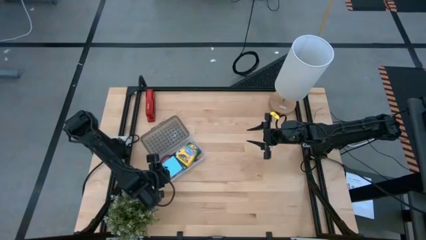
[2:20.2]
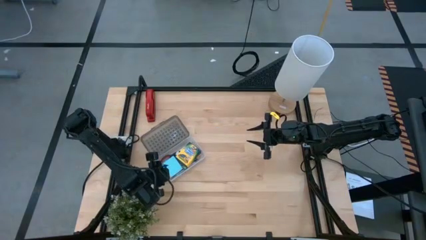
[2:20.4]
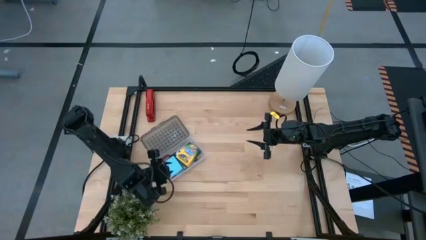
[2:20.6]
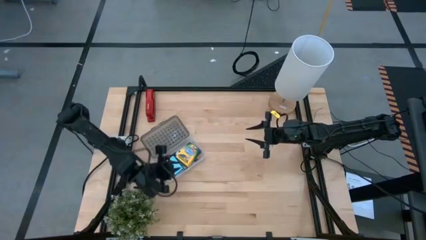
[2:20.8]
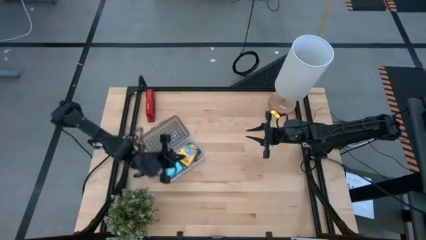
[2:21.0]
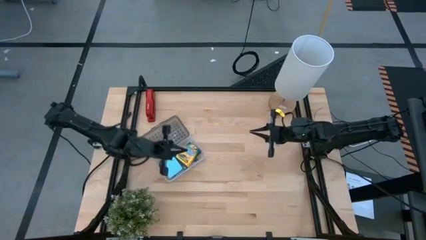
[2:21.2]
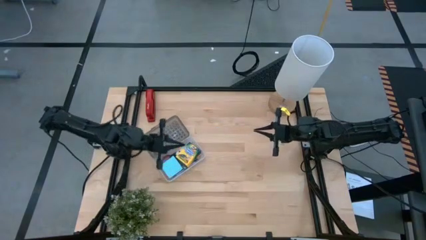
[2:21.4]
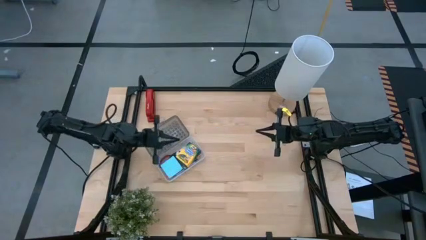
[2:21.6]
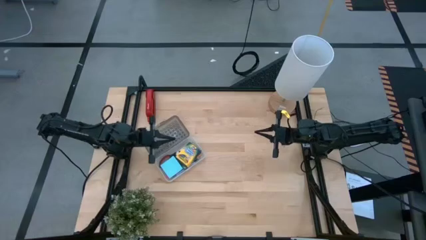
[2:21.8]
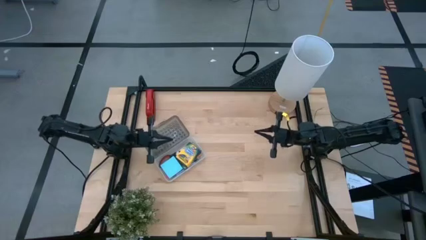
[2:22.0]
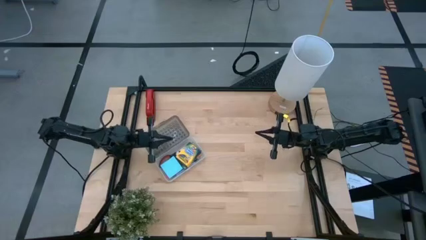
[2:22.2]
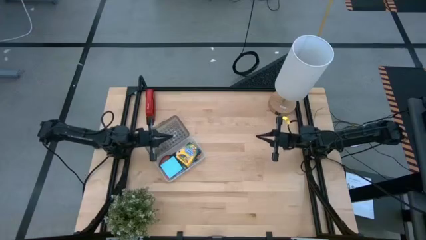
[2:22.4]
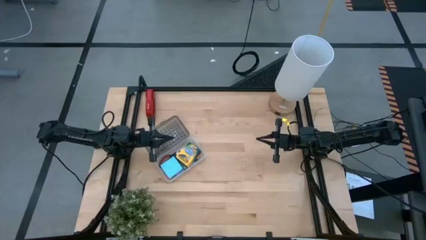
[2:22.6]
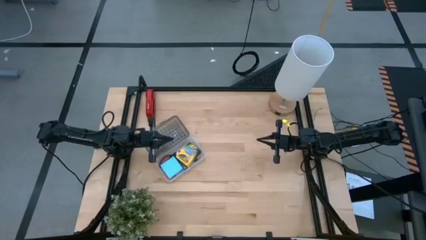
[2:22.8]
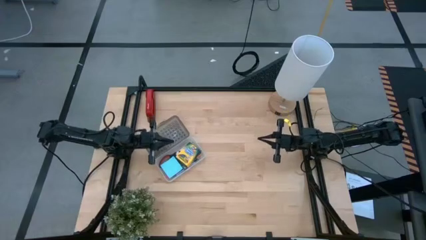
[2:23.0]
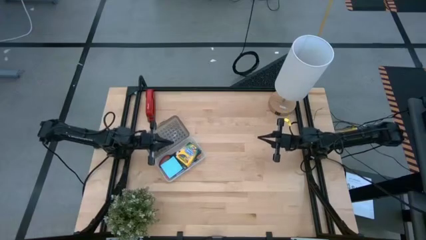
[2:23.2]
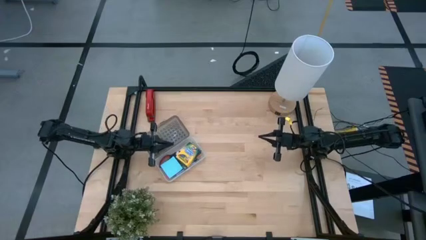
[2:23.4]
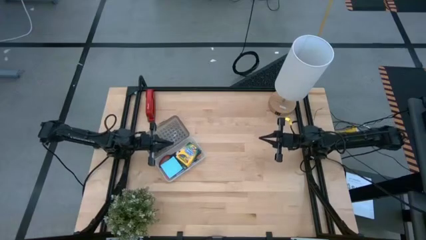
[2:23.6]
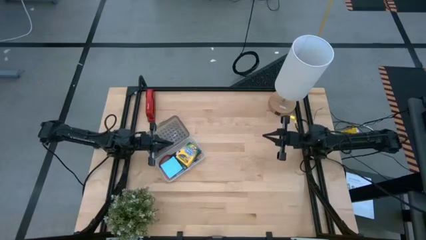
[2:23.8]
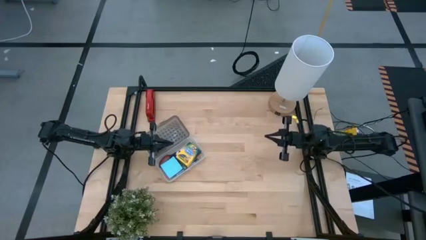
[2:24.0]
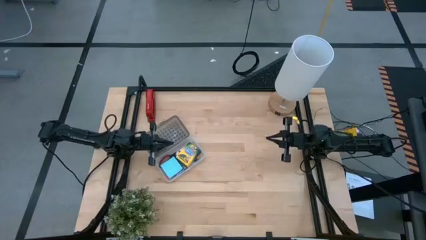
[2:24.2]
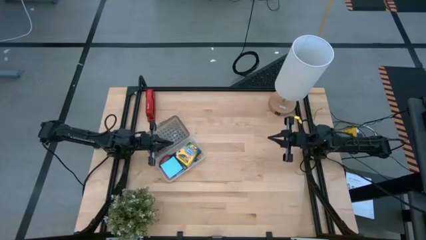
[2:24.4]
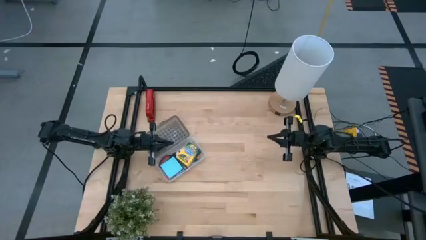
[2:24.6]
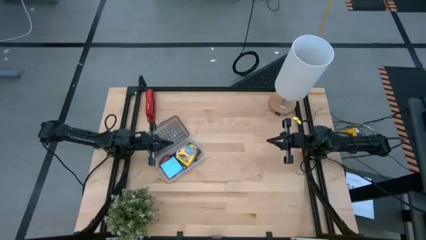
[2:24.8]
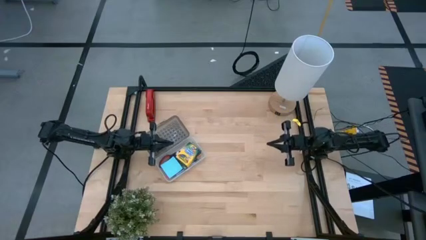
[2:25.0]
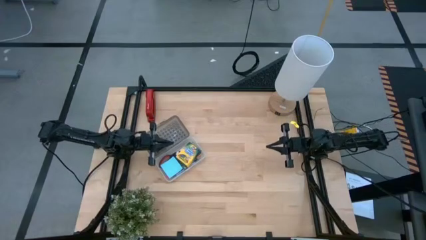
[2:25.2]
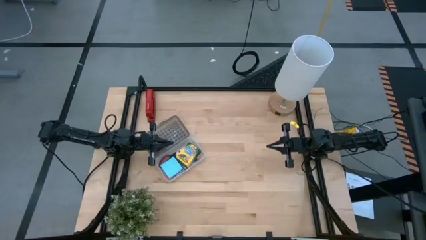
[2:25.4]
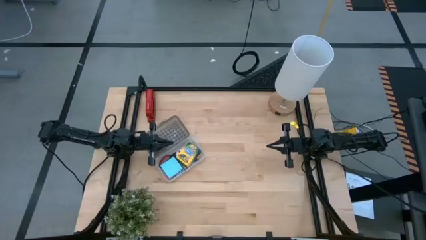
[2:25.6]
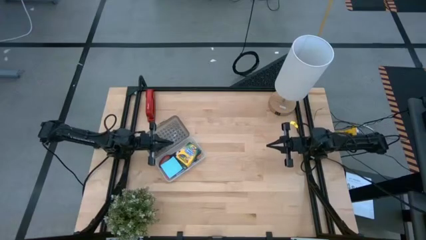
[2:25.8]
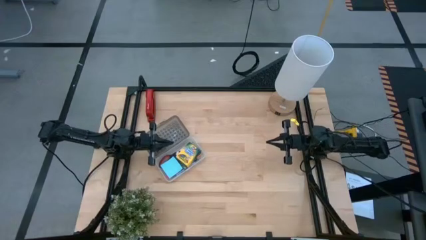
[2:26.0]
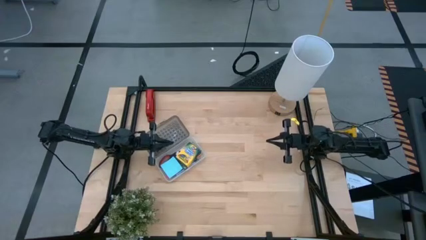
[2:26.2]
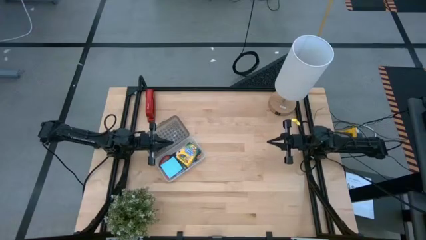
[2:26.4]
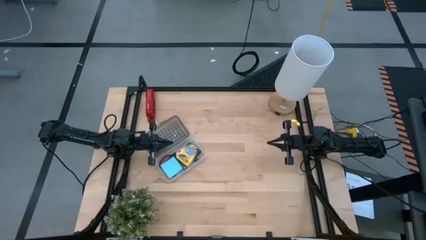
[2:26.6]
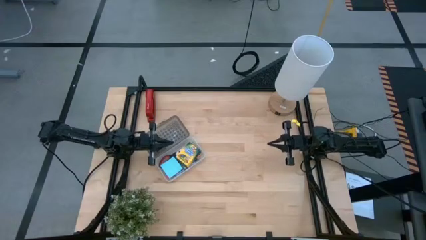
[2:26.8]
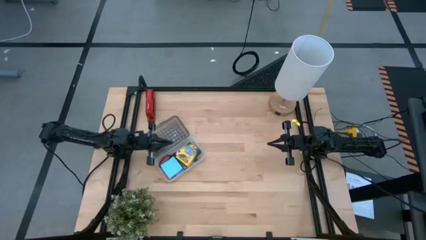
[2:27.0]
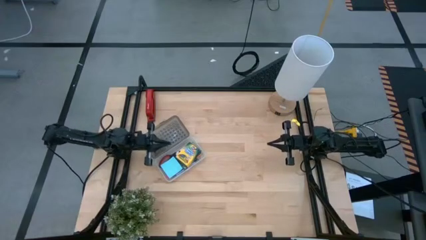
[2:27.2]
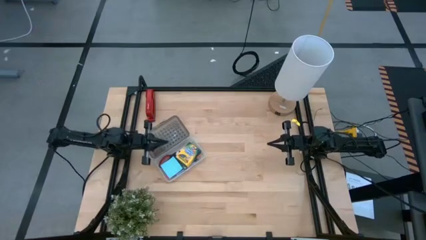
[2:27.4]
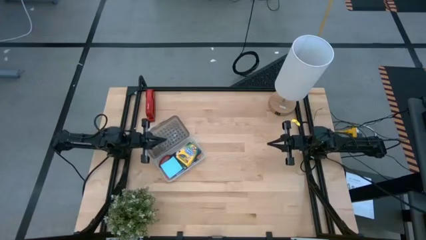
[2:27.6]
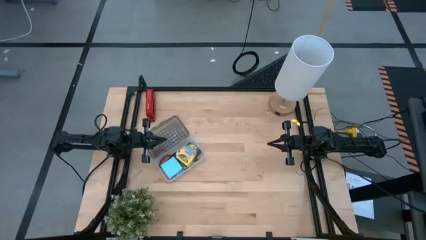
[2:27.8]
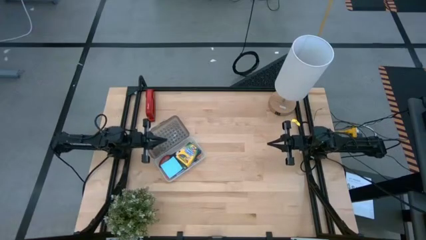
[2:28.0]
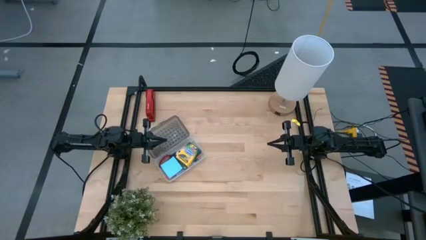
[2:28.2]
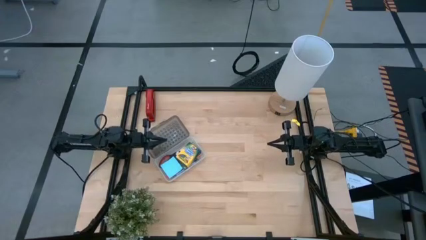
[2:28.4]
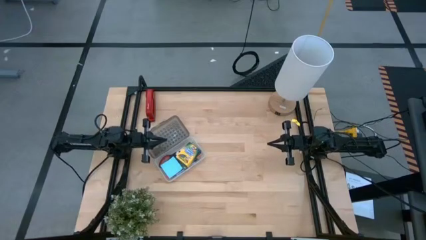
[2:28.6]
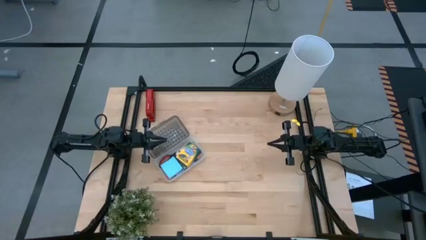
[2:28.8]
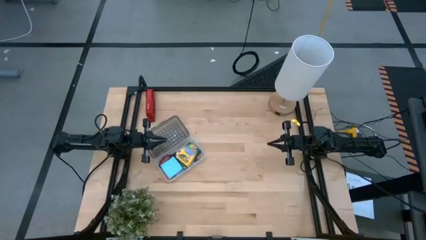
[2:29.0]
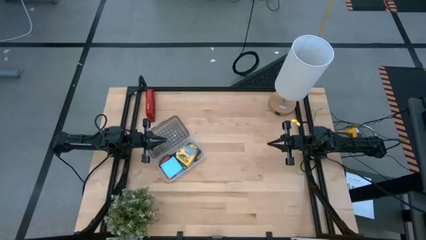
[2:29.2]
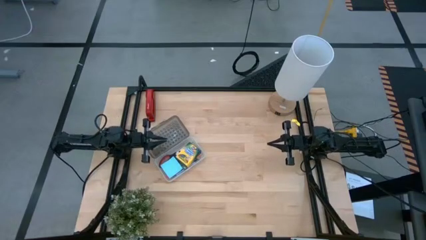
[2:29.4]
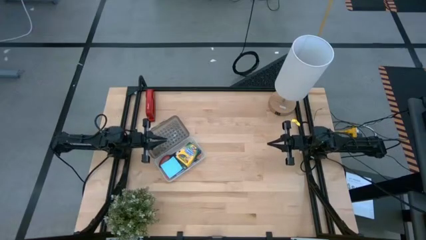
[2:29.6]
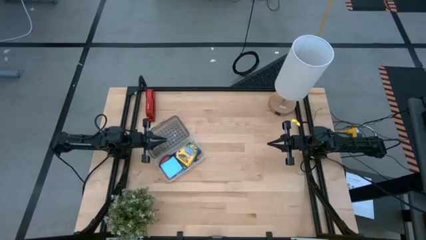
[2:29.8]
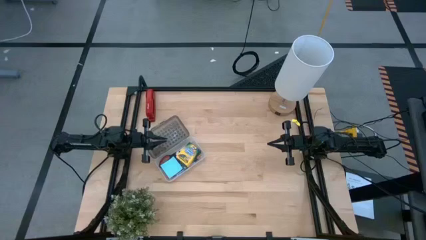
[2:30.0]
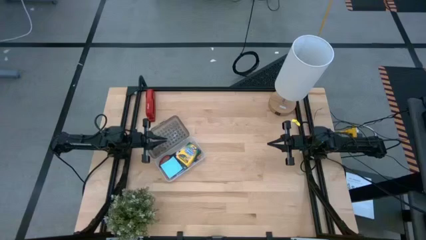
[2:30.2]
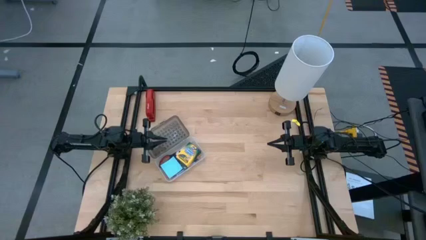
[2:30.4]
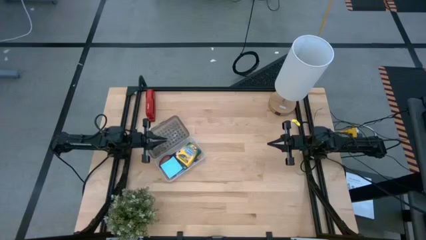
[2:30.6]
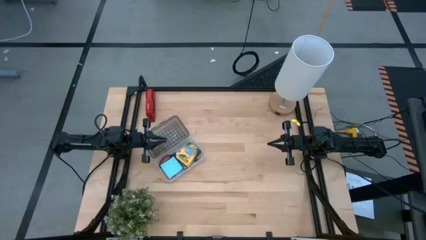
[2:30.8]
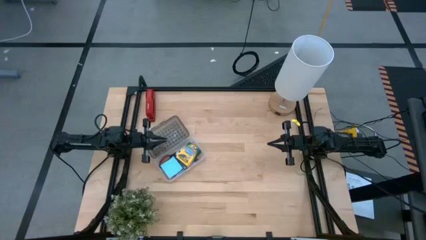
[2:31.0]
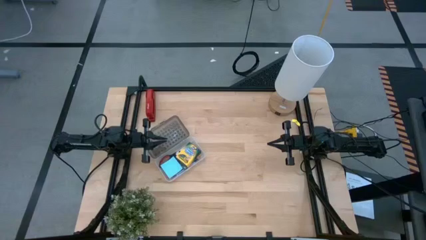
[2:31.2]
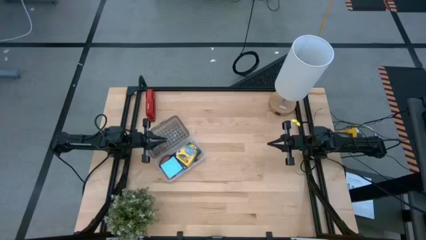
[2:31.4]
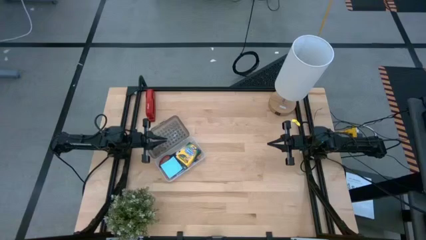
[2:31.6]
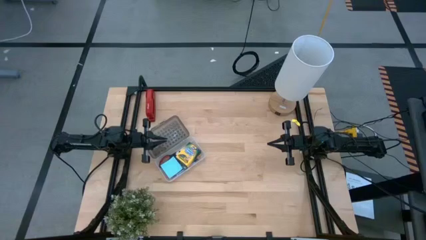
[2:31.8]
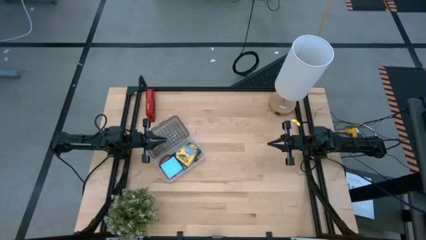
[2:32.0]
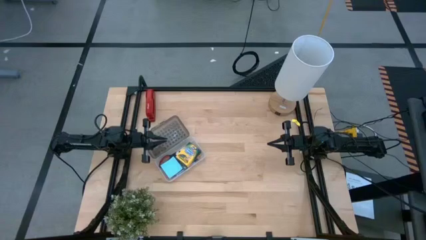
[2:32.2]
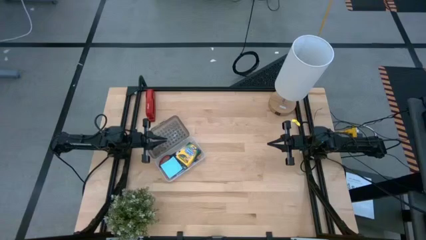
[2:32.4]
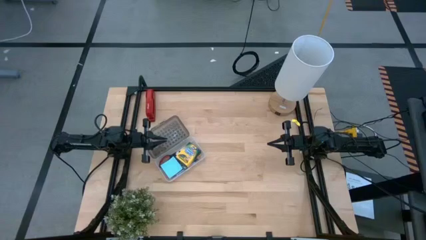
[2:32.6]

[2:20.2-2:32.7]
Task: Pack school essentials
Return to Home Position

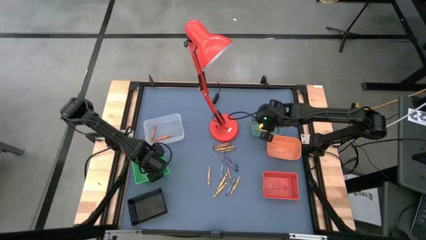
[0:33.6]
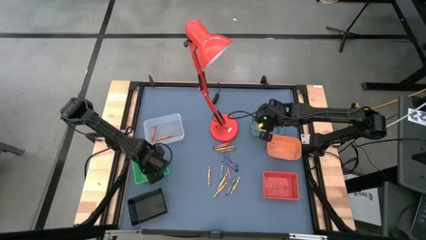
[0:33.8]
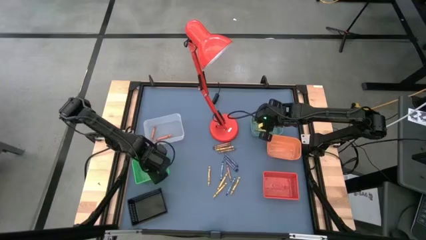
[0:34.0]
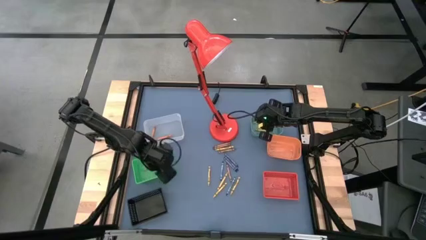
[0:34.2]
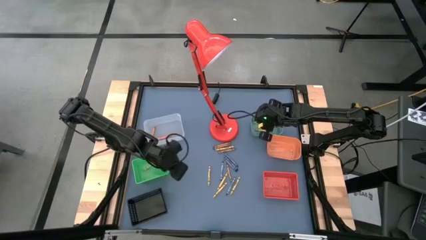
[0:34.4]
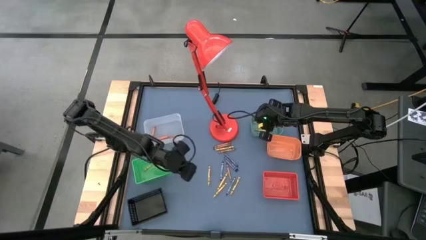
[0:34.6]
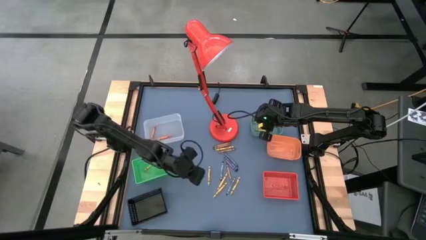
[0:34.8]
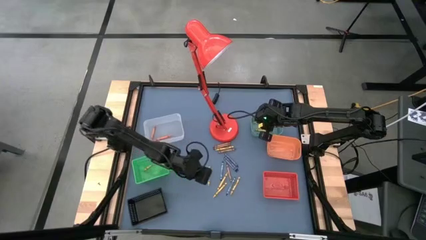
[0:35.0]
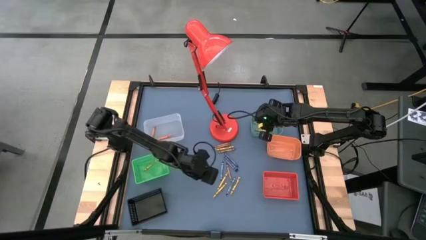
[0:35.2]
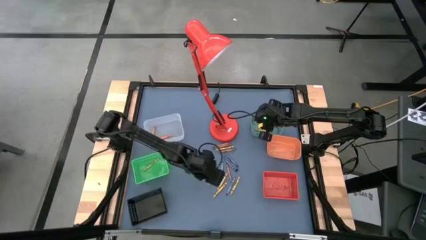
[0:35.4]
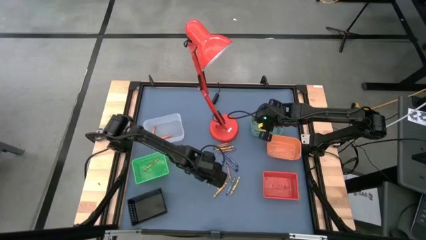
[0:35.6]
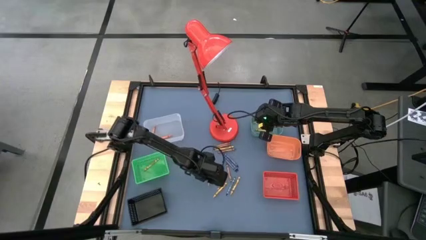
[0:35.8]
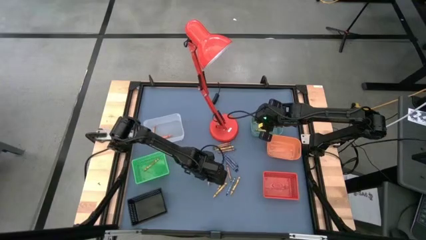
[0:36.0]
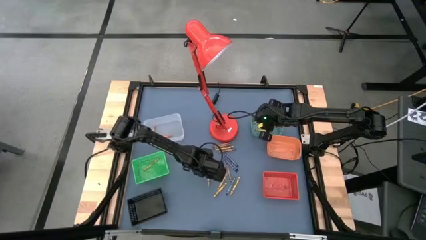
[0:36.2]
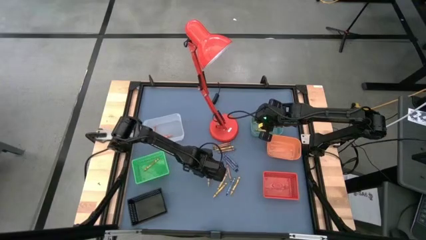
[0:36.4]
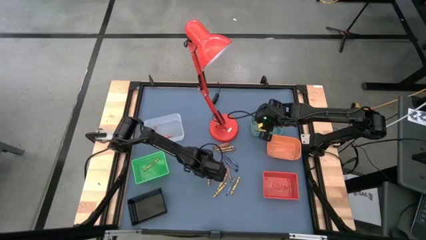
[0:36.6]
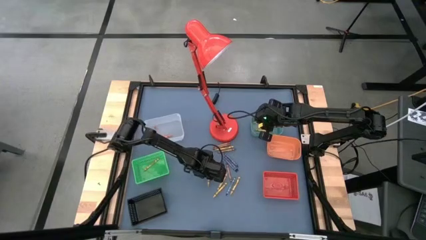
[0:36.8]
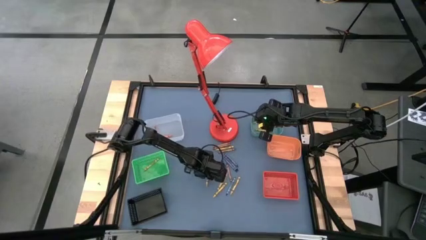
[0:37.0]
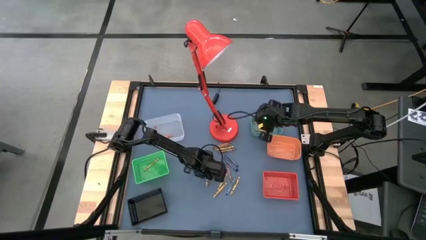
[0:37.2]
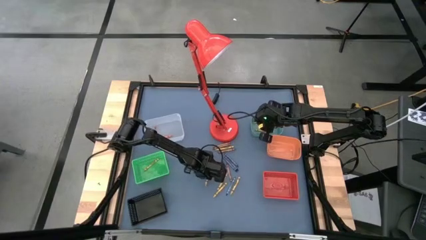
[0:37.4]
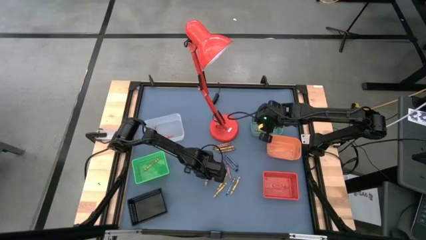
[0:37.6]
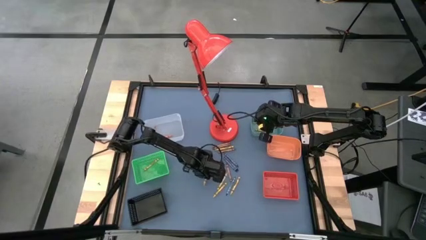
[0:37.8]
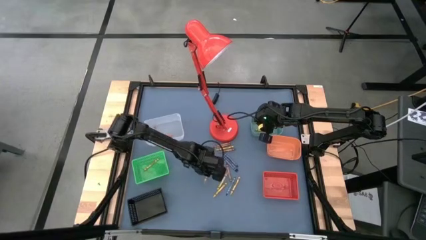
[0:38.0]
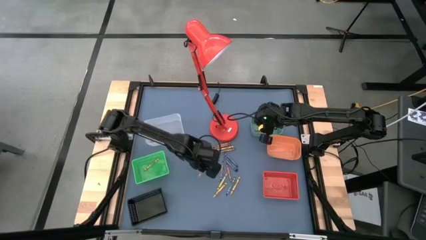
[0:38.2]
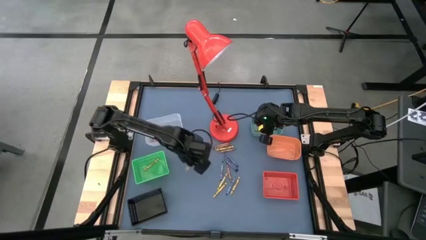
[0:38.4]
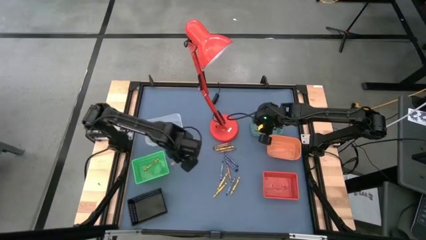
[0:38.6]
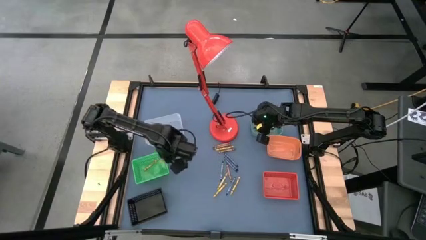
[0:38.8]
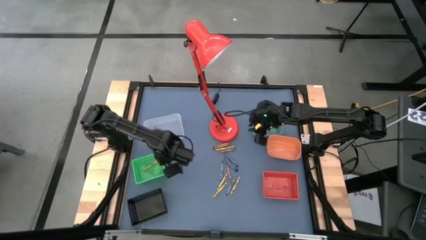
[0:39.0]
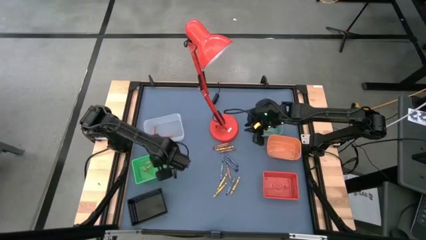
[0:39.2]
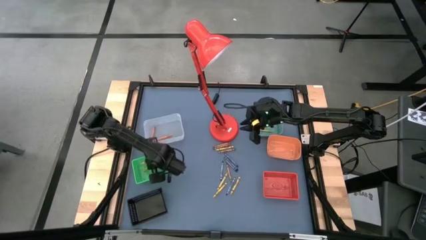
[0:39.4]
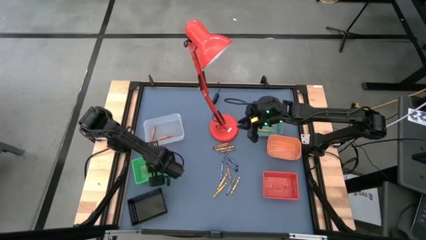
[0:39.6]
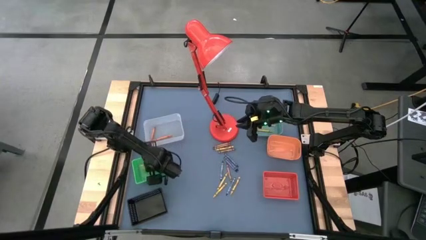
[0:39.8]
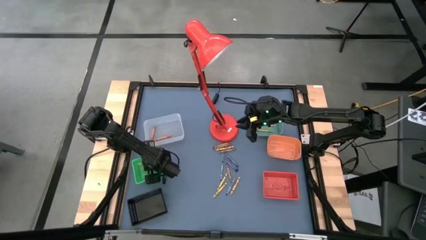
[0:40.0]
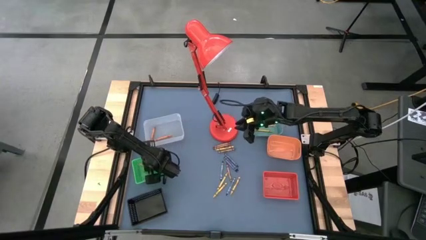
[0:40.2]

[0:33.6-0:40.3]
Task: Sort crayons
Put the golden crayon into the green bin
